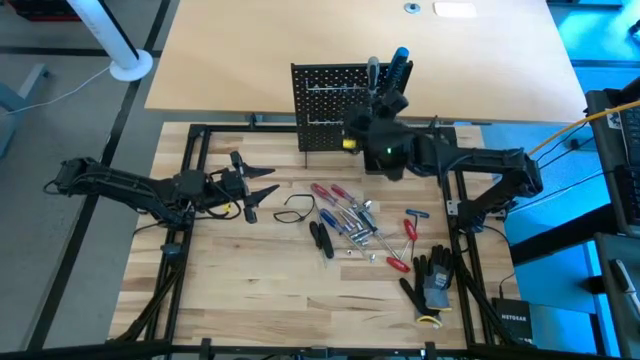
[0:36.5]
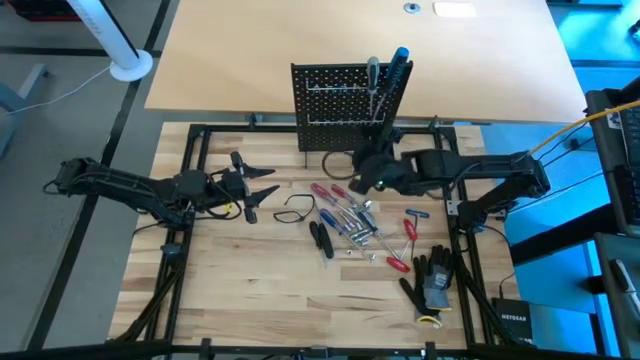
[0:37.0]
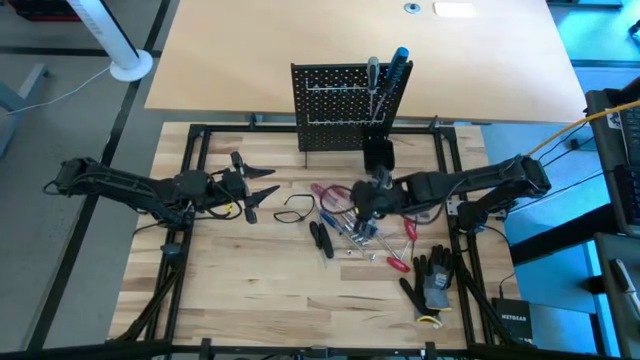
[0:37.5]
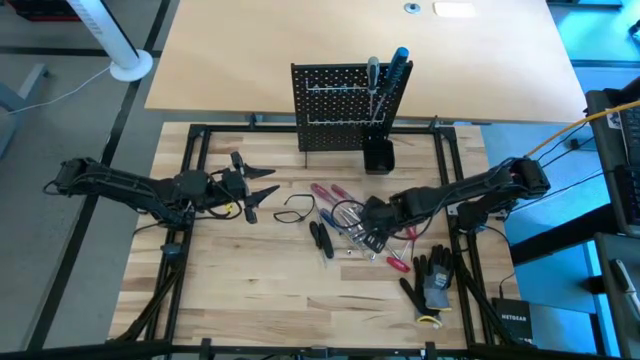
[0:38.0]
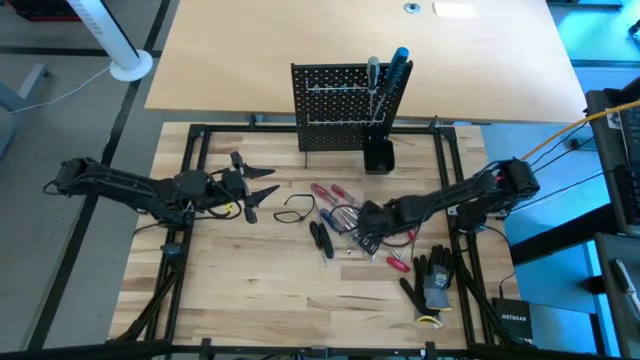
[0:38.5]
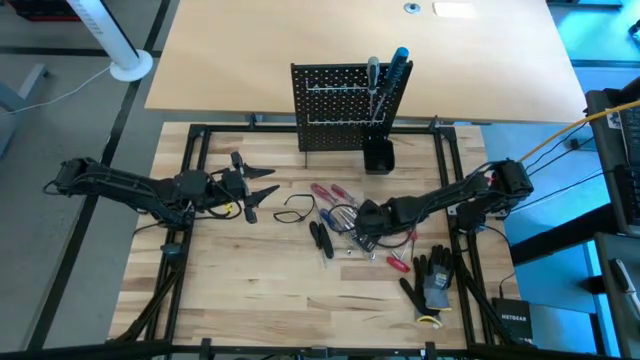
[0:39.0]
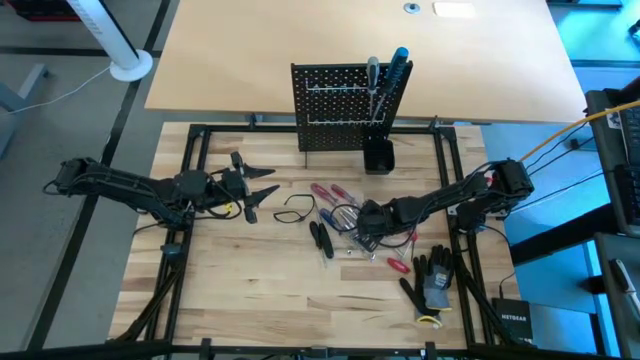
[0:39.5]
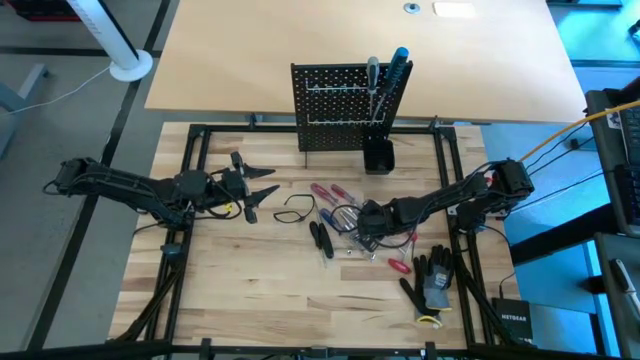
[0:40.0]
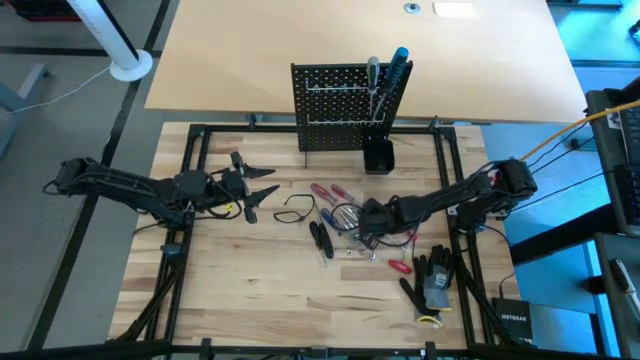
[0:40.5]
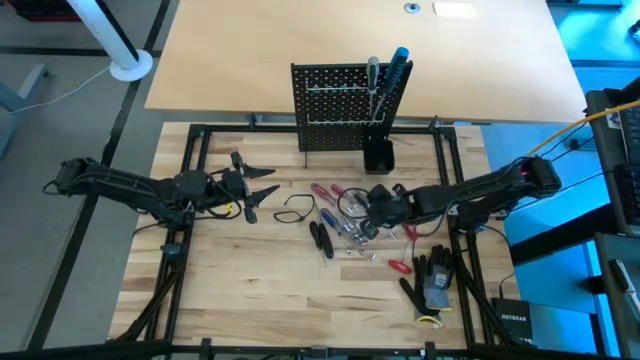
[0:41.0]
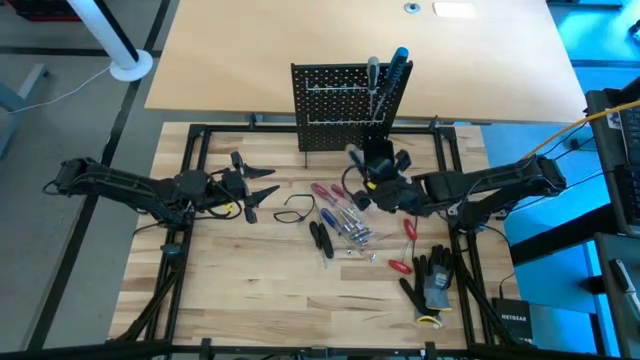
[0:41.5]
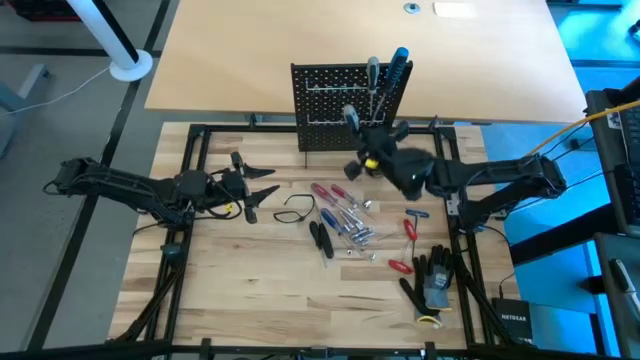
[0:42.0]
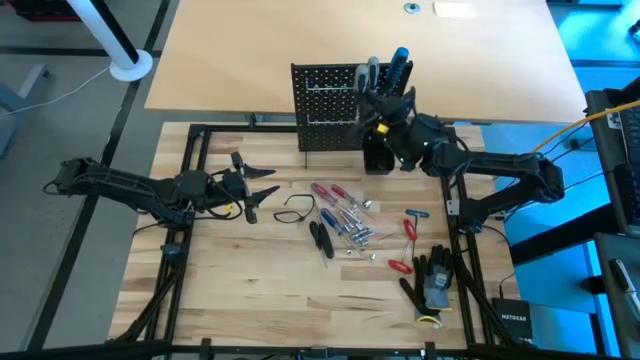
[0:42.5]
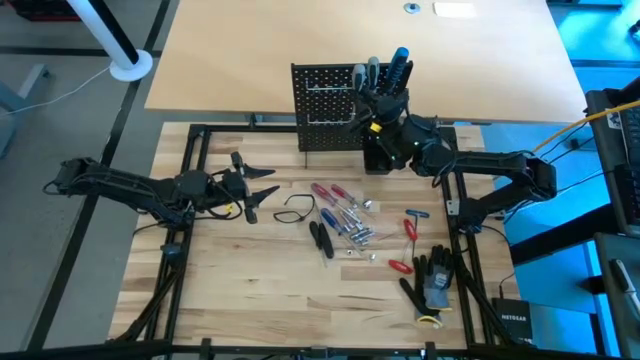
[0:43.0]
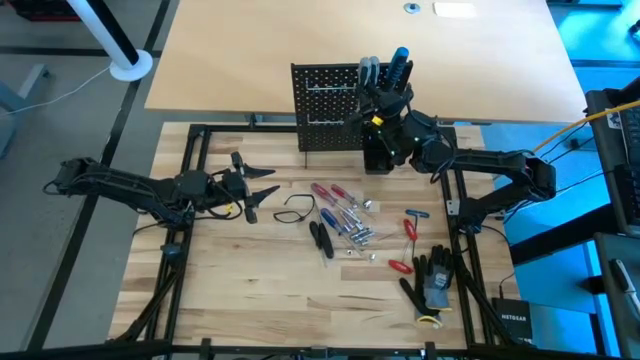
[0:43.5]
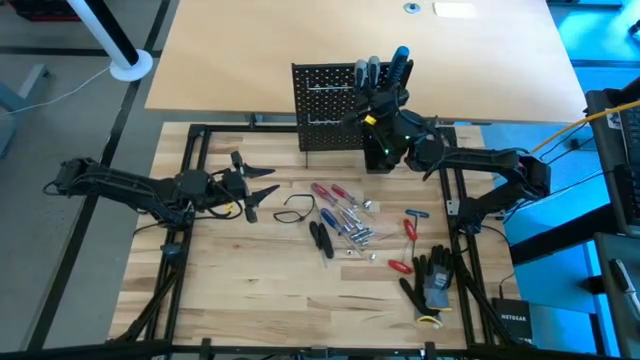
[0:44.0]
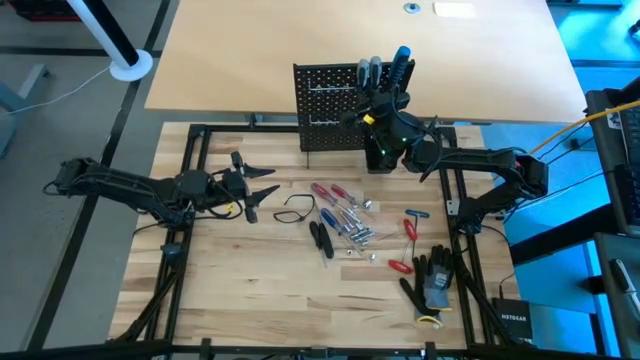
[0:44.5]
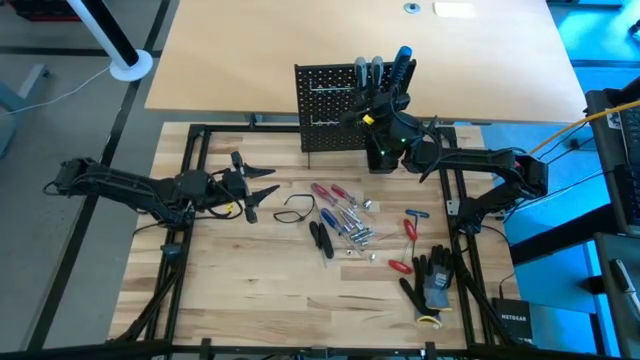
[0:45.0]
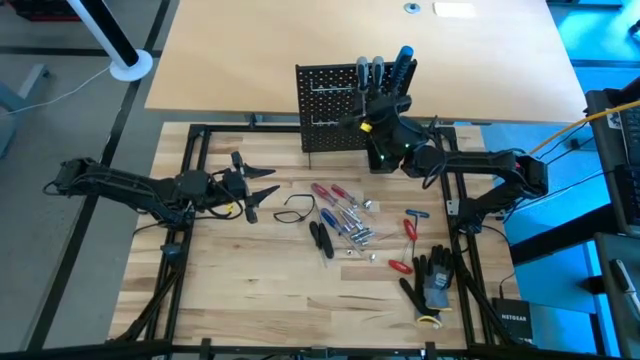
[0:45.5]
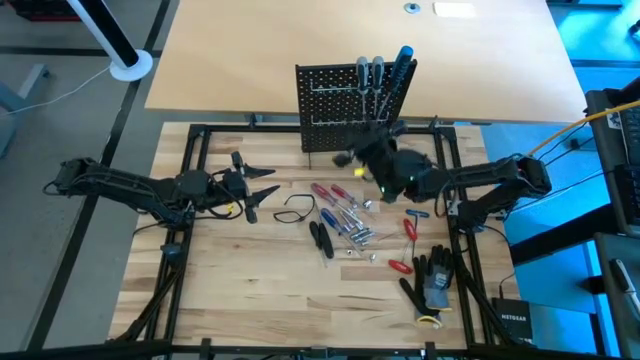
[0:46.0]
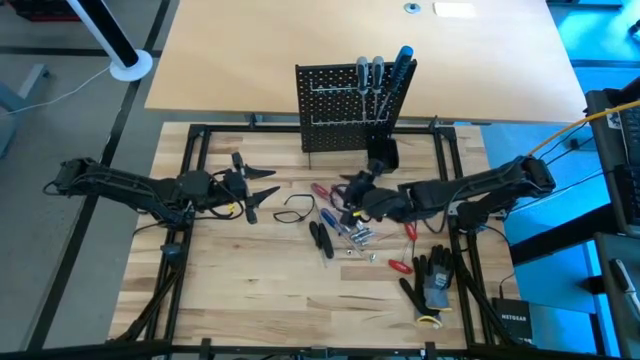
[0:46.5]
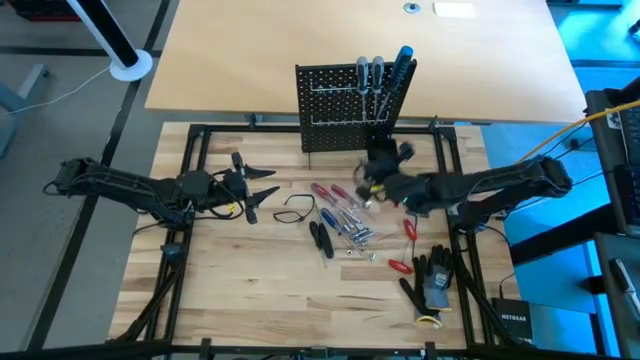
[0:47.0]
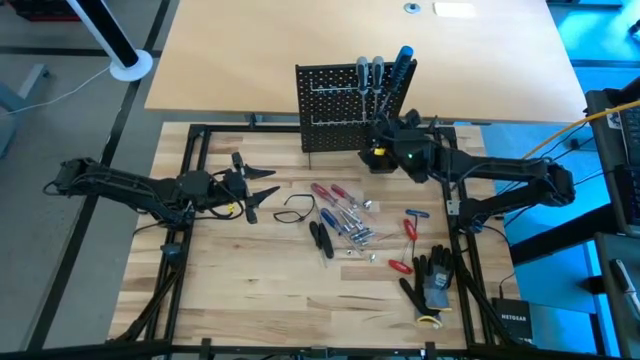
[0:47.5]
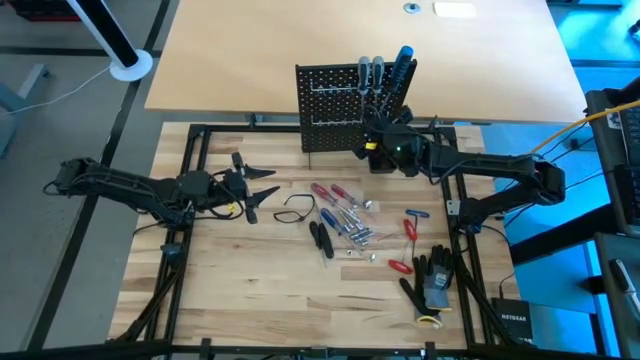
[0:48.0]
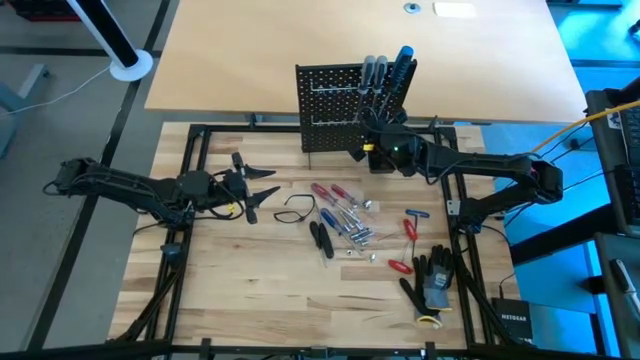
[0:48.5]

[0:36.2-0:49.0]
Task: Hang tools onto peg board
Hang the gray screwdriver on the peg board

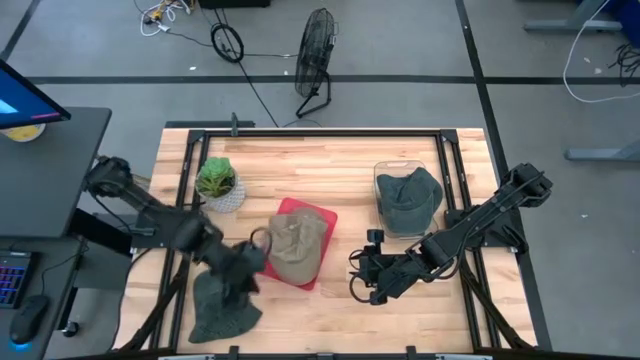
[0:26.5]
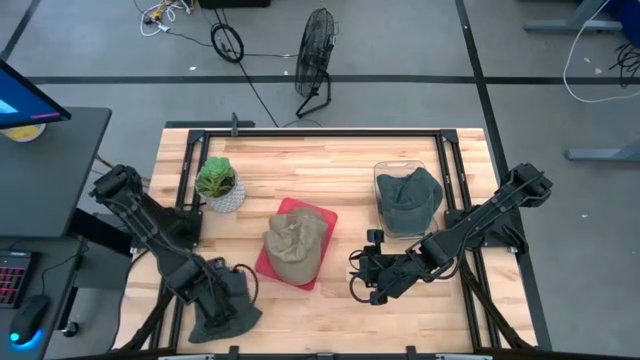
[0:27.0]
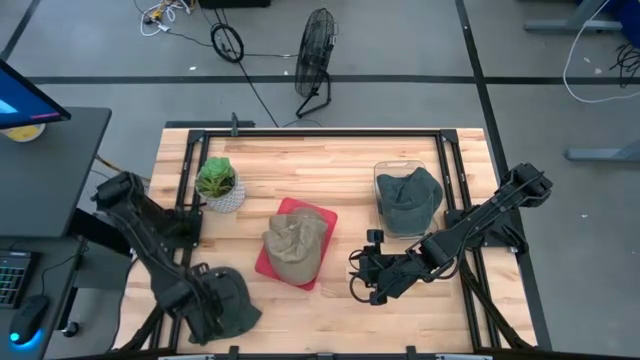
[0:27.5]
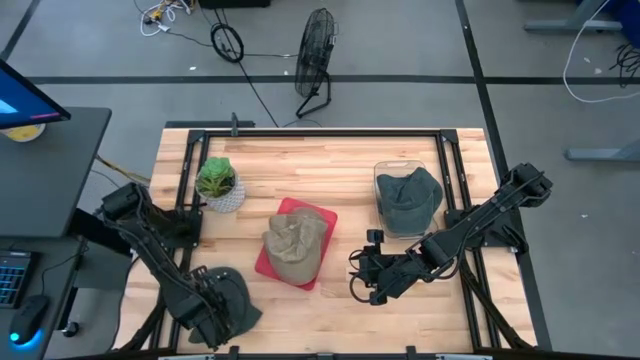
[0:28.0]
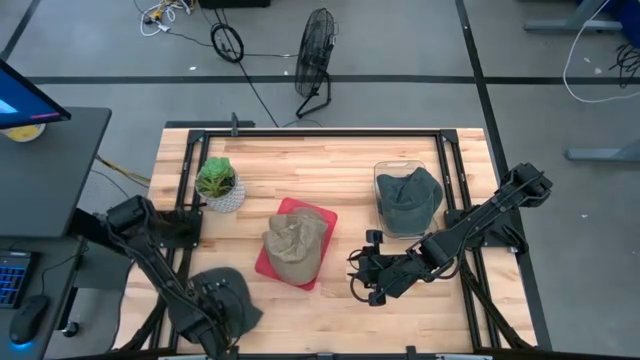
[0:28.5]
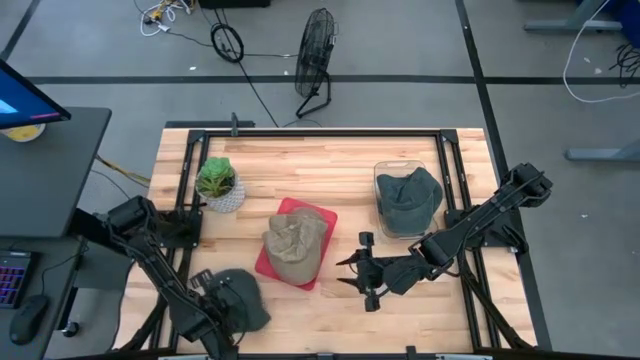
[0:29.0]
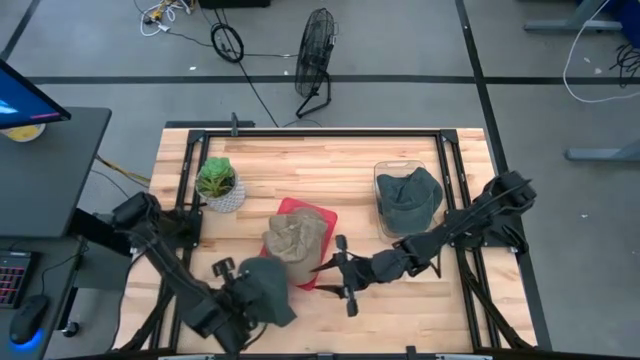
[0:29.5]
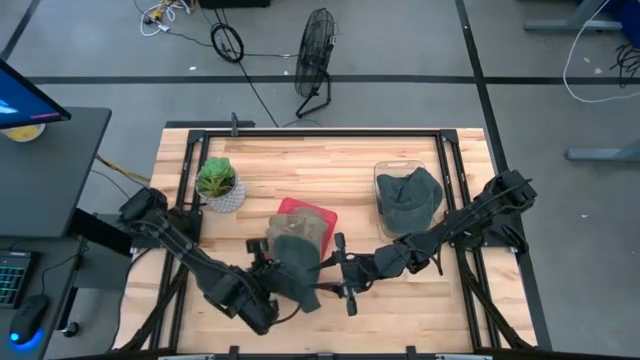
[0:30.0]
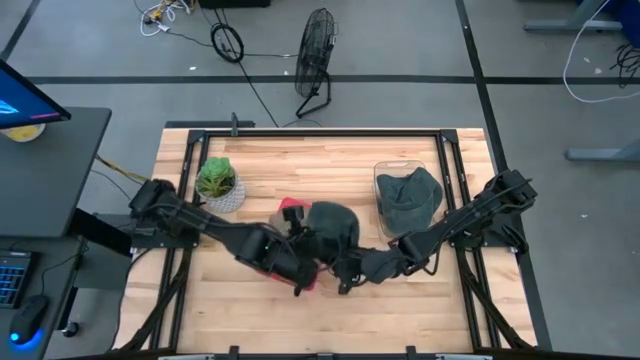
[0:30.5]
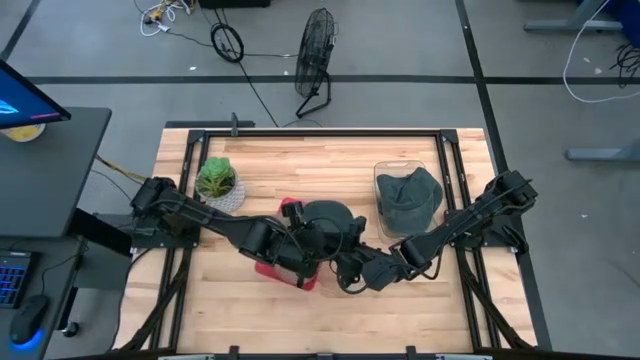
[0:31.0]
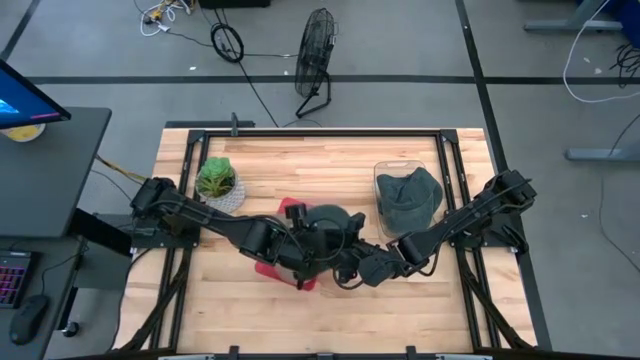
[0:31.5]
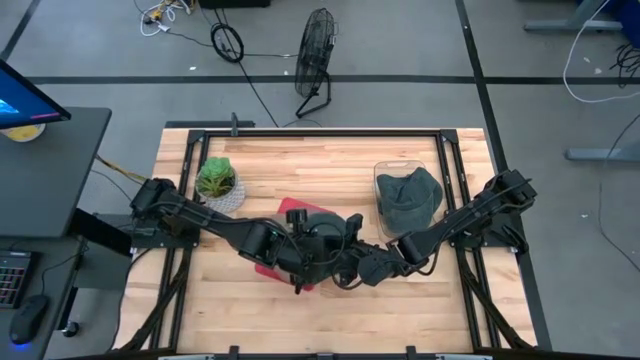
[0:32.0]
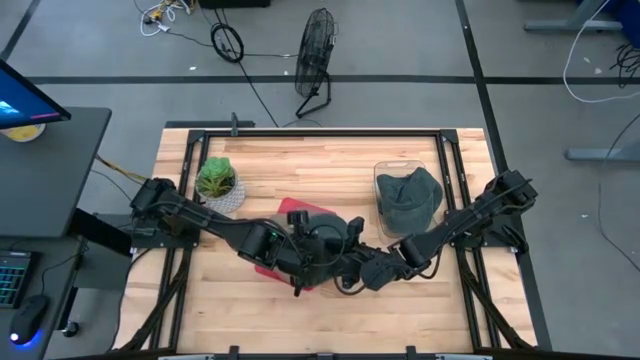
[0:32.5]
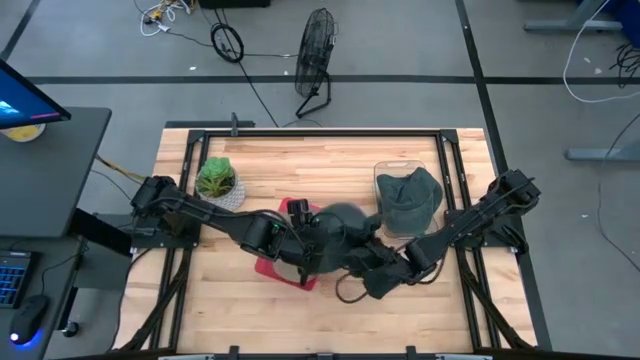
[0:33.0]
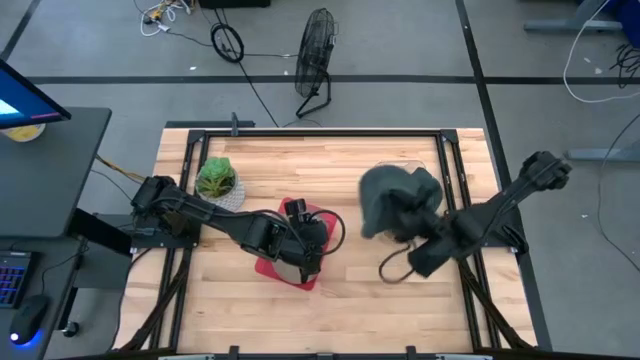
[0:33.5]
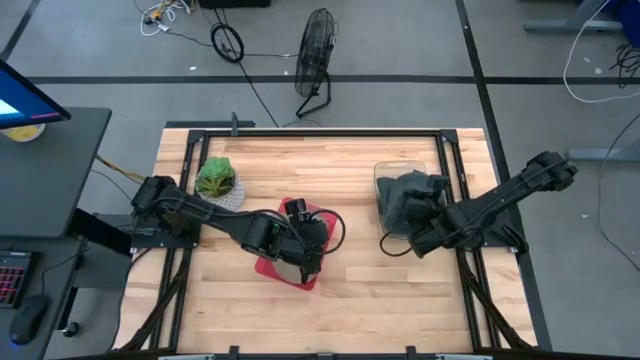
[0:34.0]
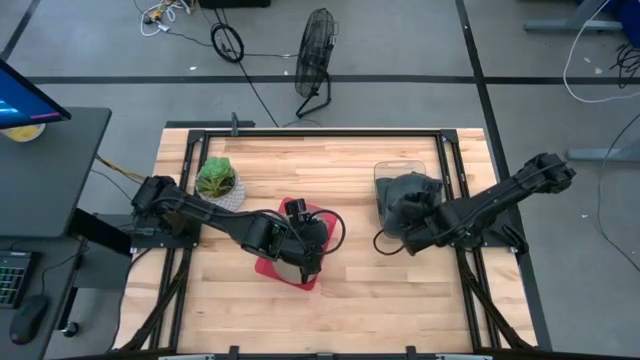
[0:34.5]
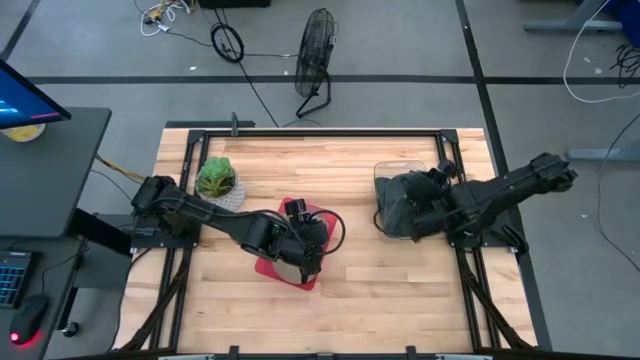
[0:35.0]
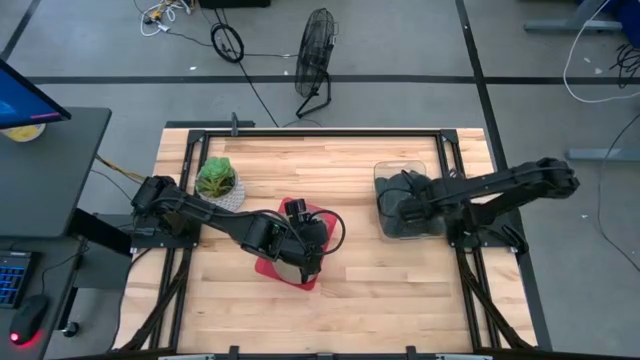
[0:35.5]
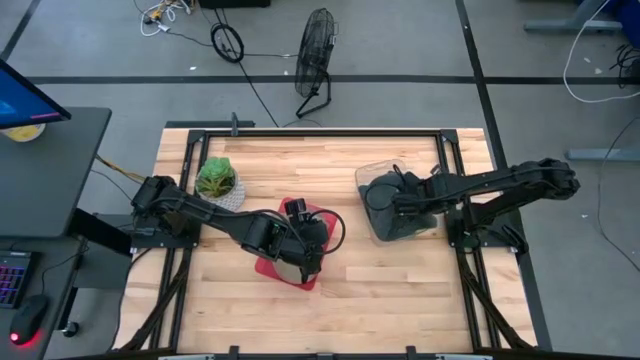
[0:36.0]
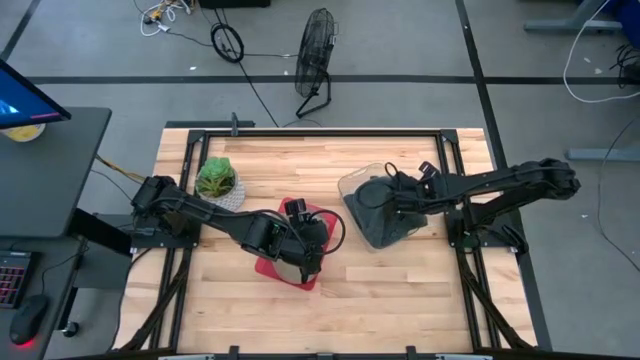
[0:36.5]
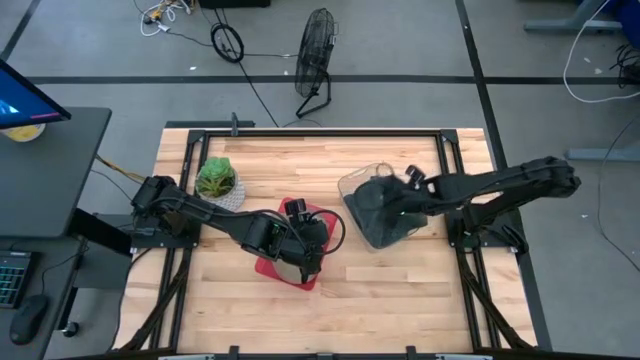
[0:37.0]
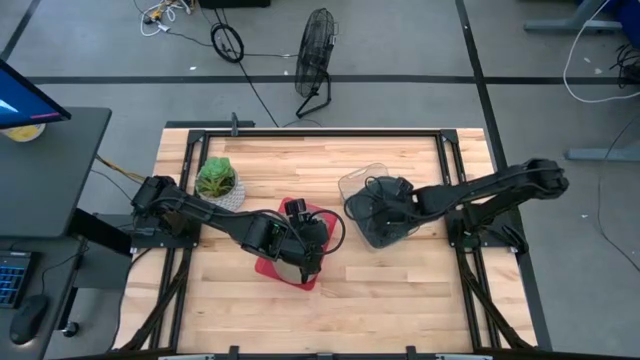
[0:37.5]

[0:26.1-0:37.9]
Task: Pick & Place hat
Put the black cap into the transparent bin
